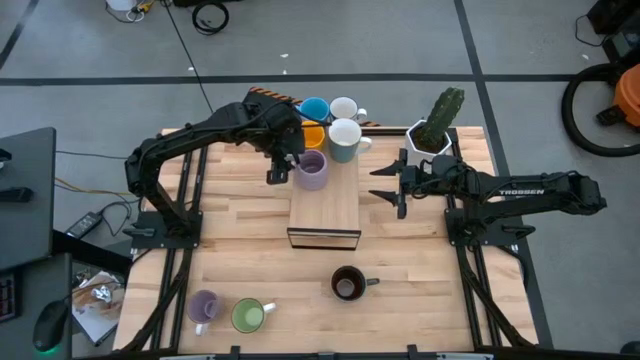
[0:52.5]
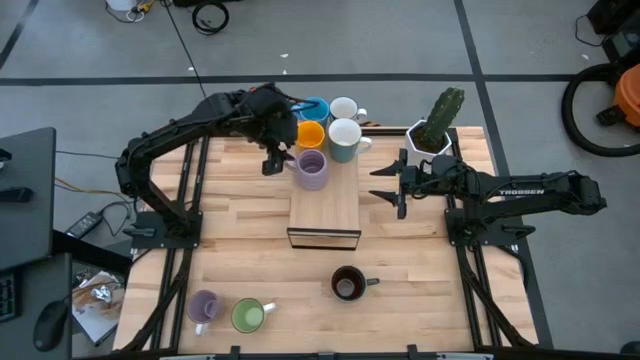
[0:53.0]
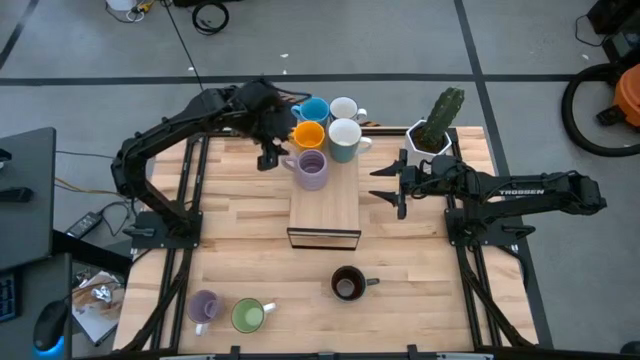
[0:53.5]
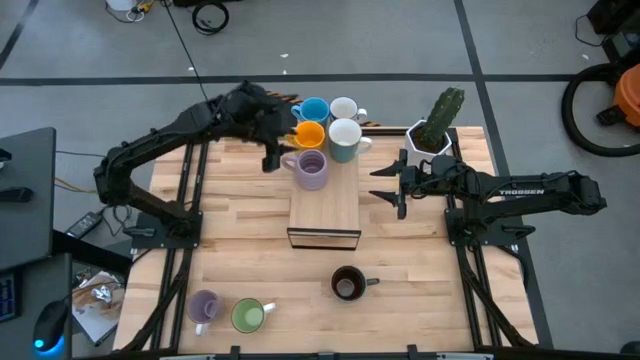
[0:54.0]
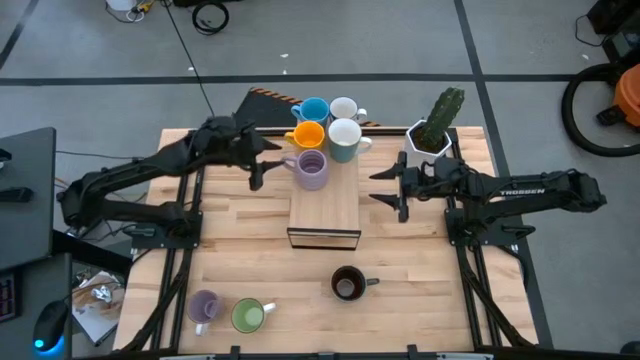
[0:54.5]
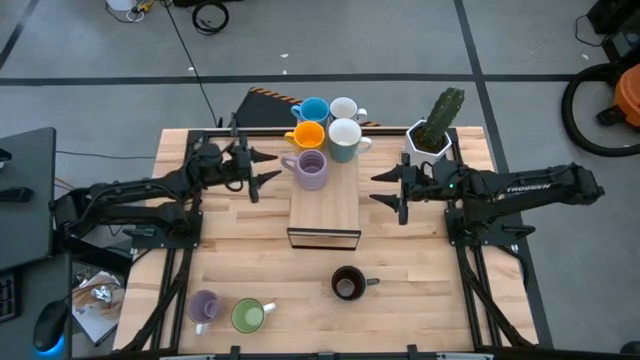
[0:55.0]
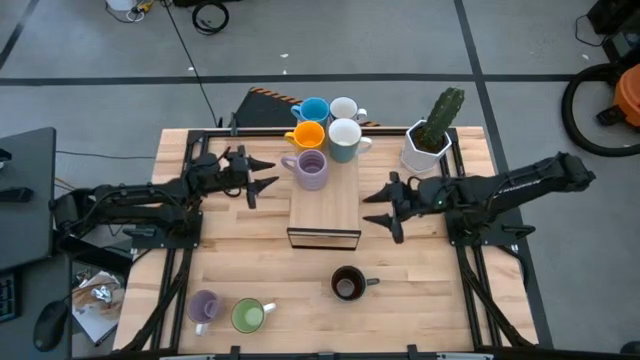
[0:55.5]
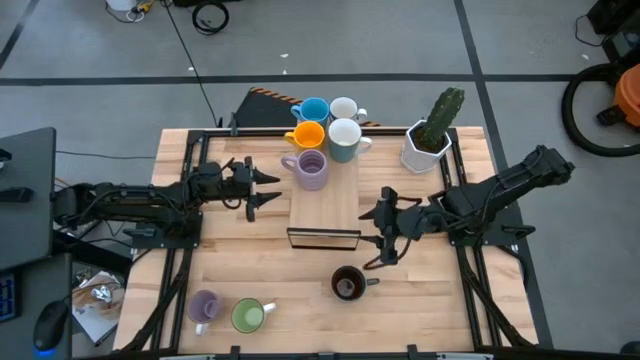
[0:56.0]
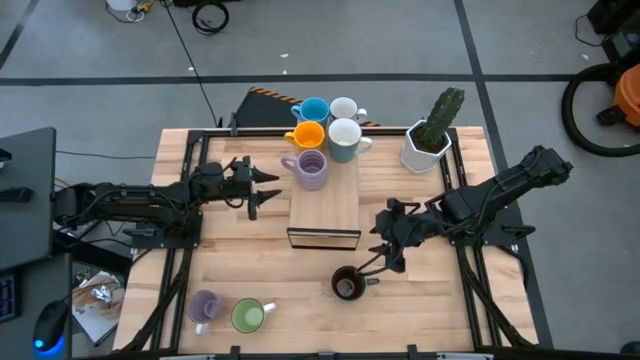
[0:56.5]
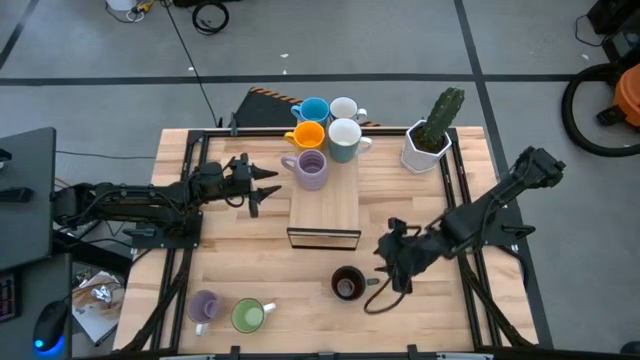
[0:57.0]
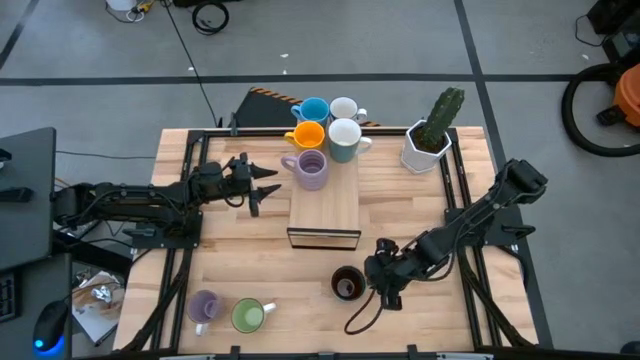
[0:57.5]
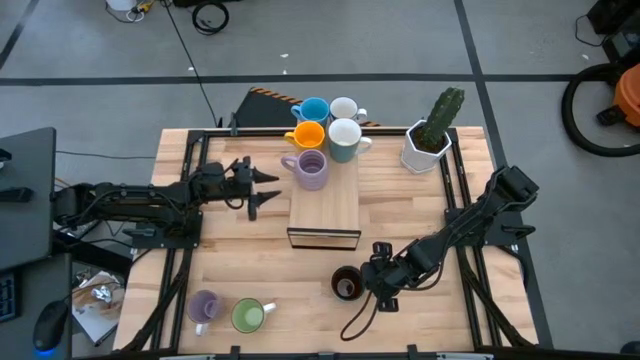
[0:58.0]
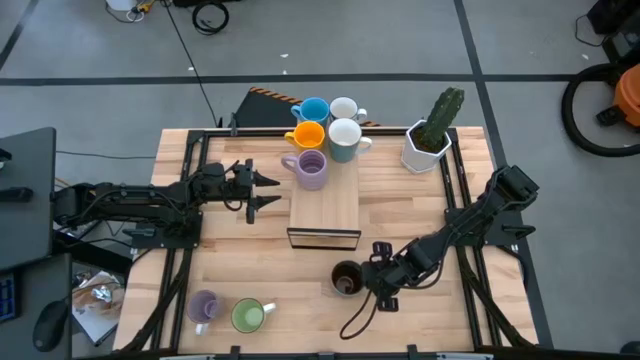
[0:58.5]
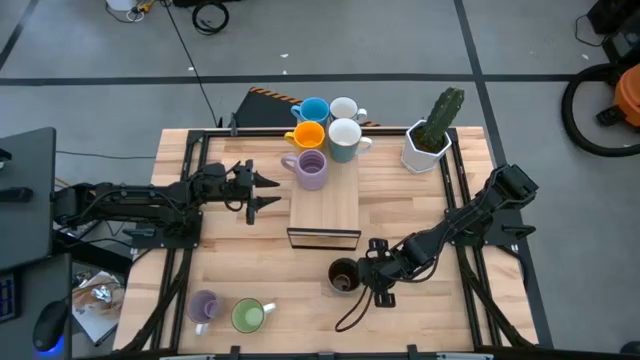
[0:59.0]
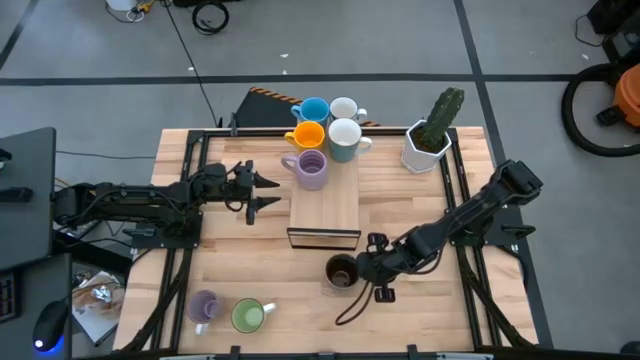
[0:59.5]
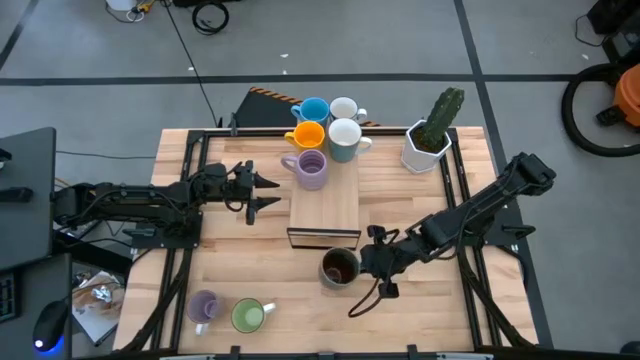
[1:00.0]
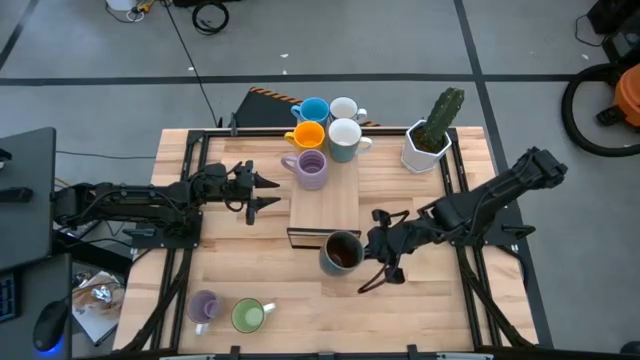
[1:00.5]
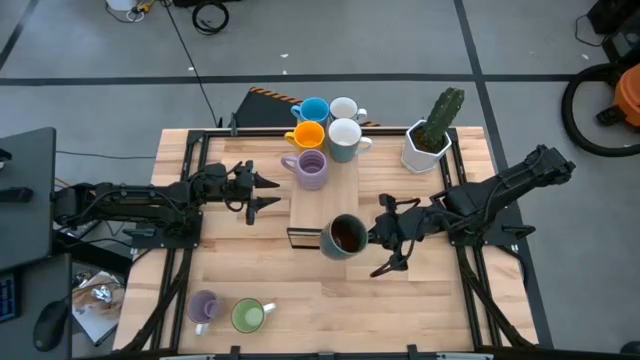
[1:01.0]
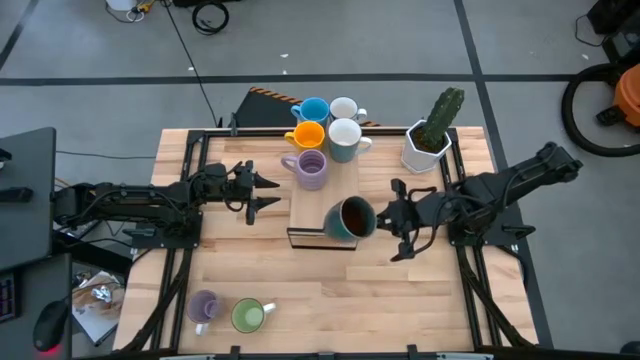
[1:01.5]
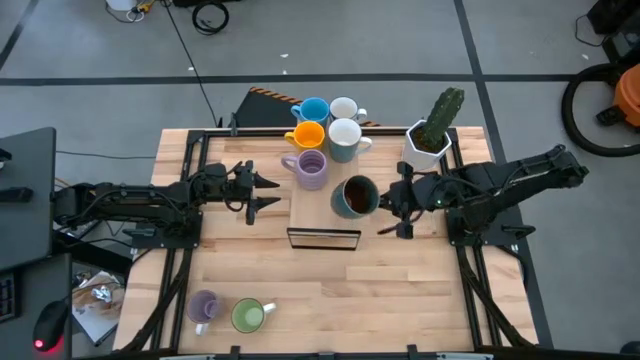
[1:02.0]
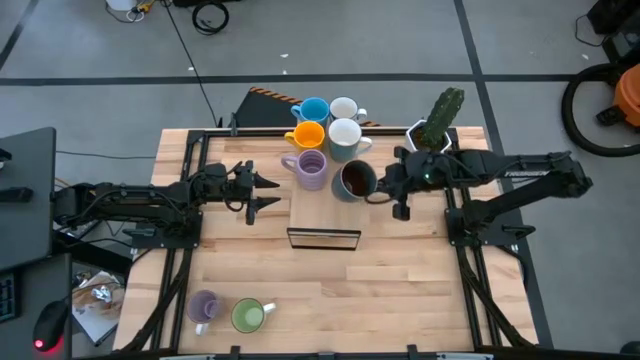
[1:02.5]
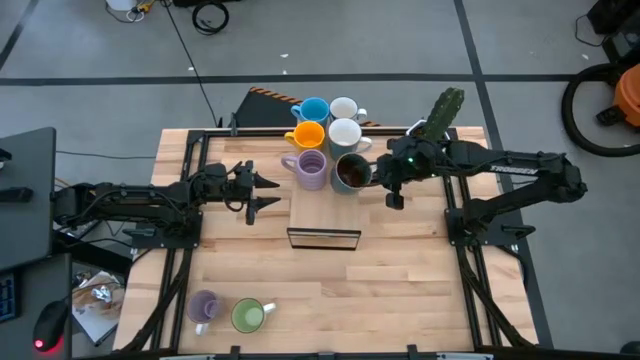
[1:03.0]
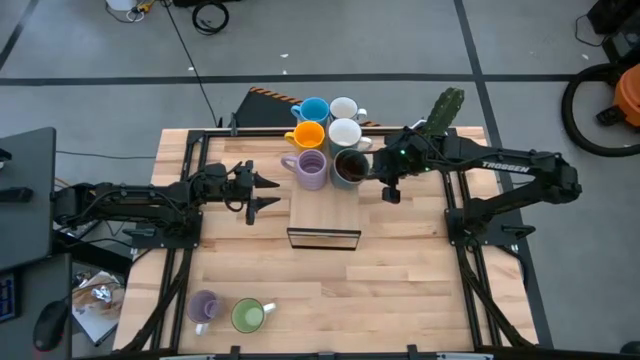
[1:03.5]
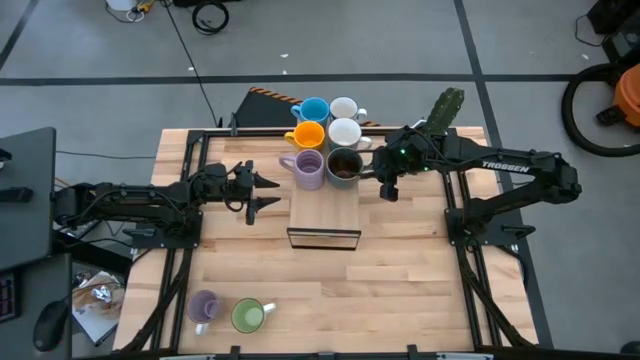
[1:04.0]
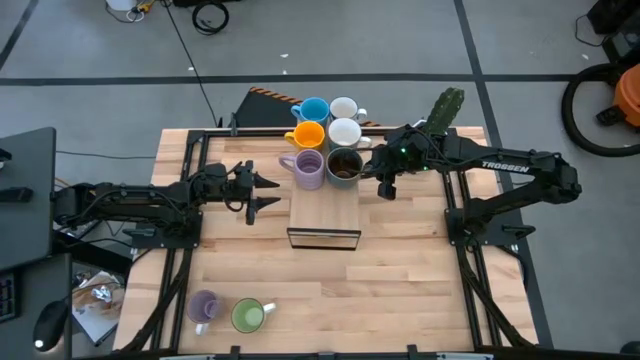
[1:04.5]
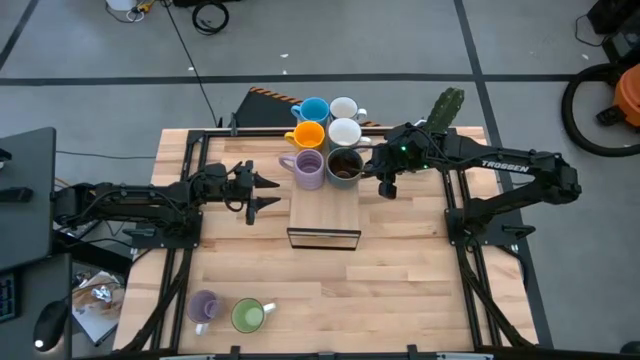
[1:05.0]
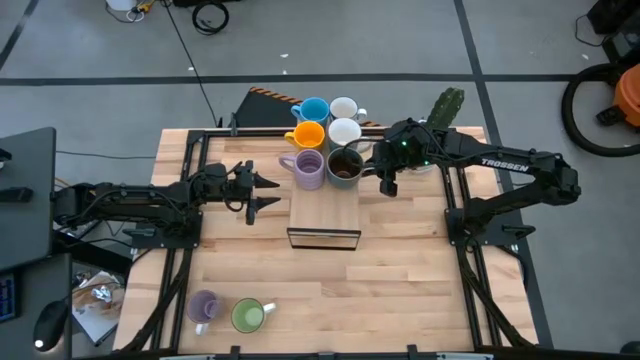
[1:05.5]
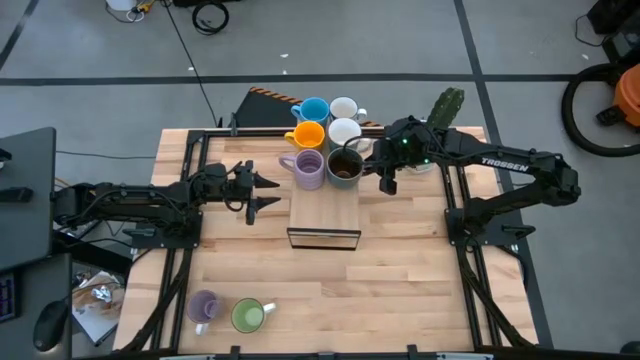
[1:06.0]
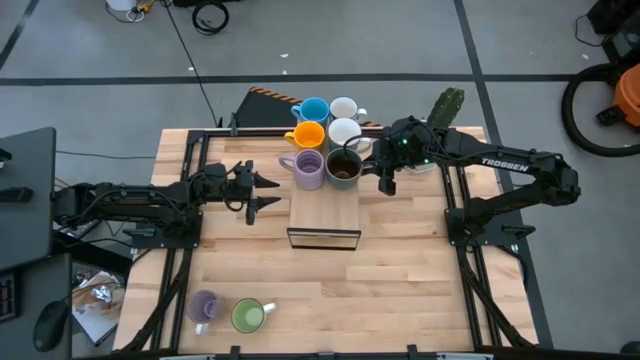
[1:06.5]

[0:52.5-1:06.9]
Task: Place coffee mugs
Put the blue brown mug on the shelf

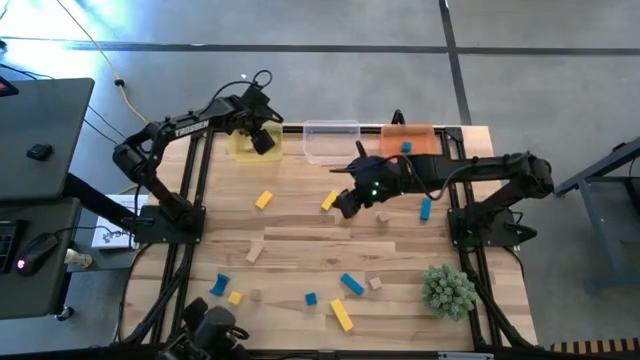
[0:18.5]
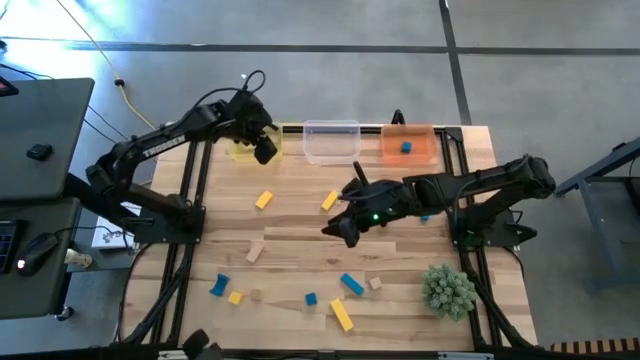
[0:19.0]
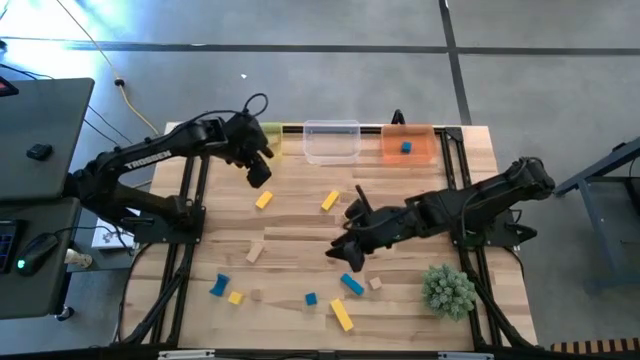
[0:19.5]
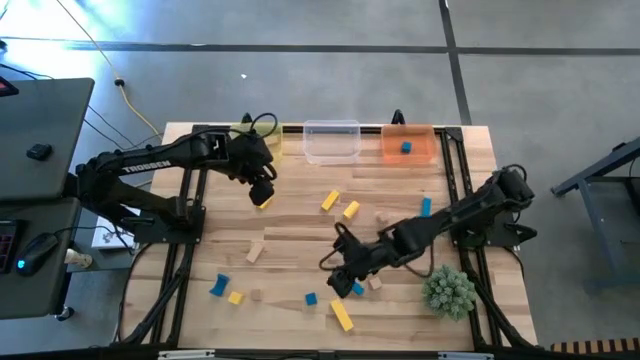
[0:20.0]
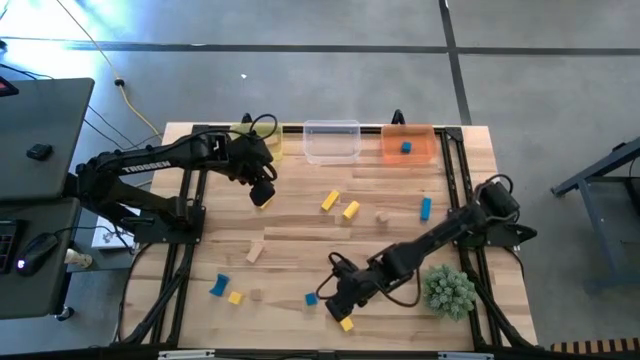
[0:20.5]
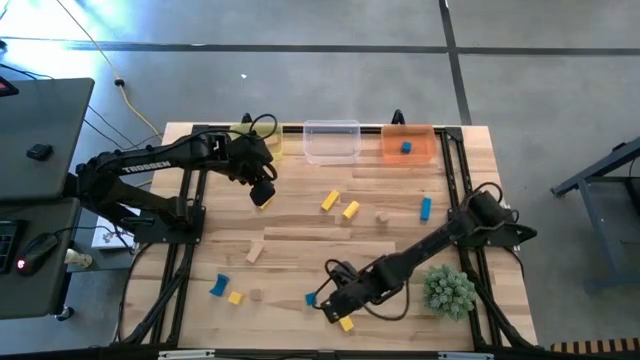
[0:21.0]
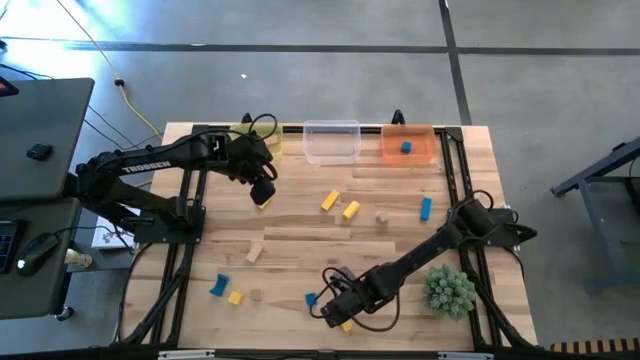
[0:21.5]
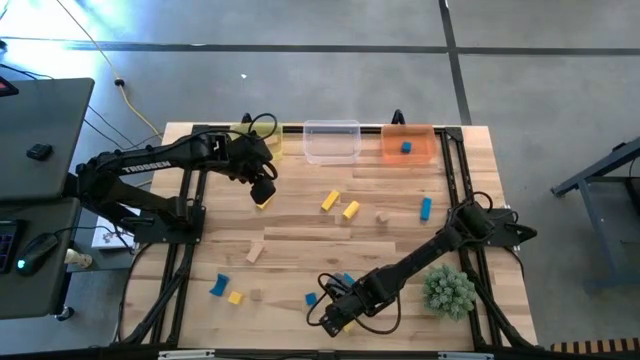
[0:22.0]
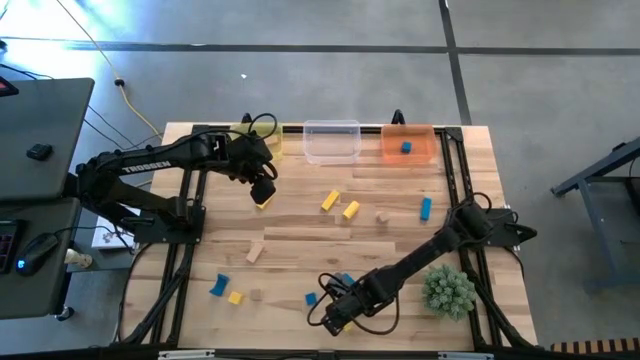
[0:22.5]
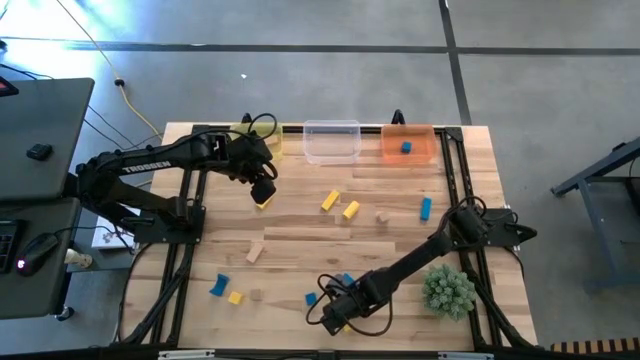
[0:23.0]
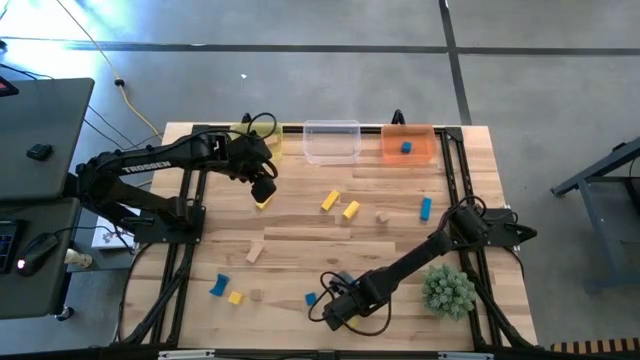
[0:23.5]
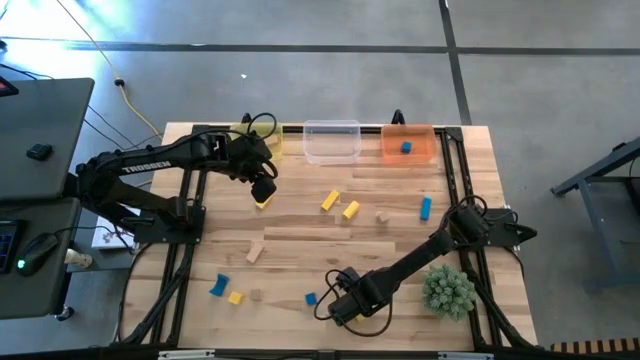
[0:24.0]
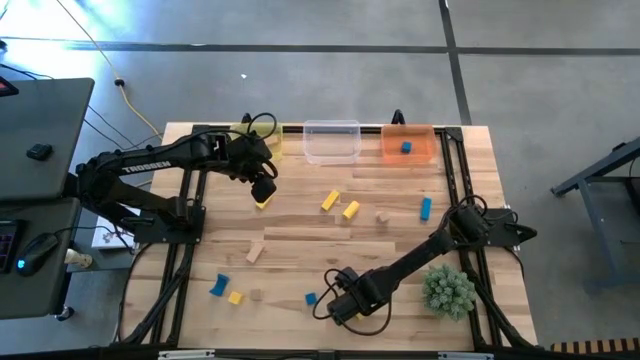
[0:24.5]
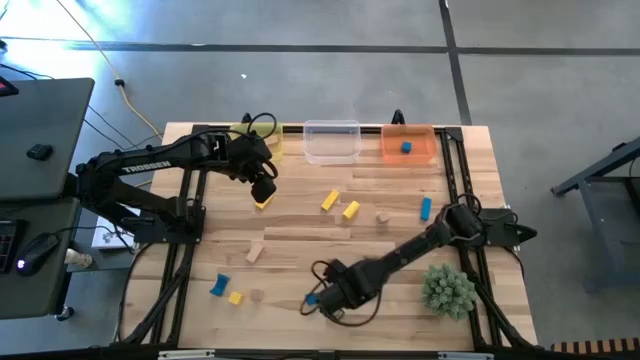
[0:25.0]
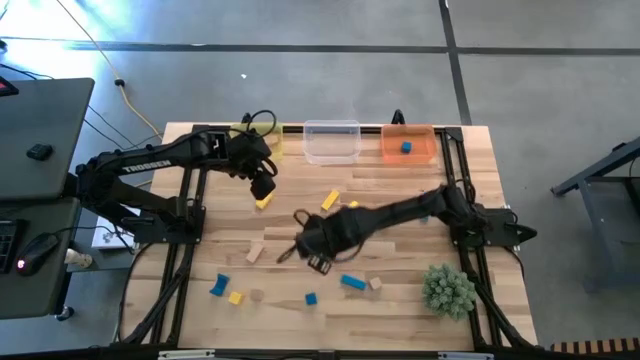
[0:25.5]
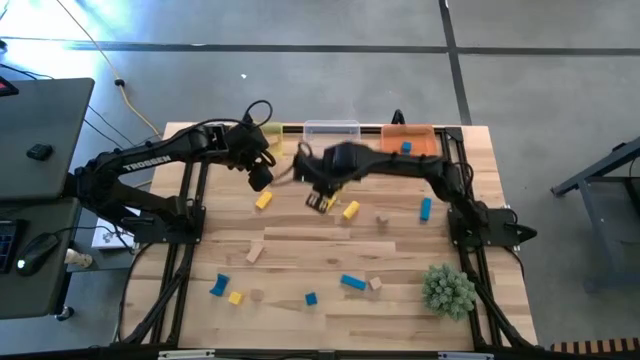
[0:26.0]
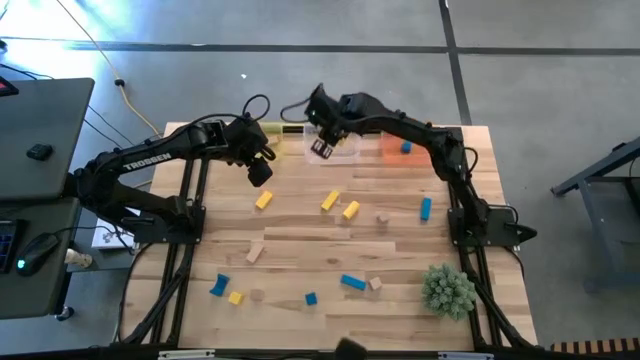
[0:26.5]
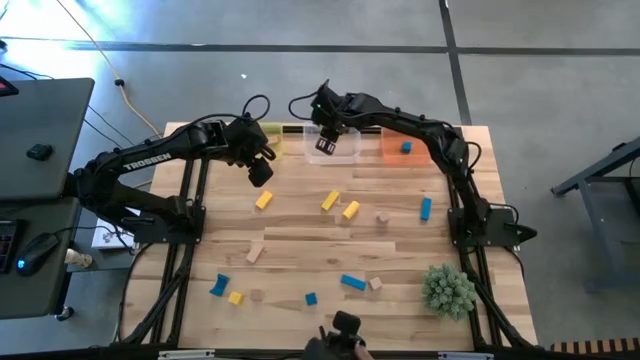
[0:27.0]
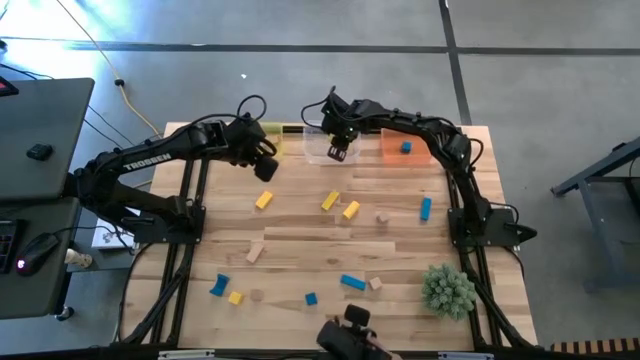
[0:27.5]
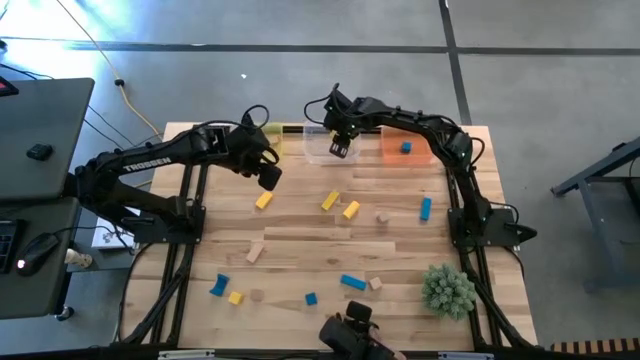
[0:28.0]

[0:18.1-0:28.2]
Task: Sort & place blocks by color
Put the yellow block into the transparent bin
